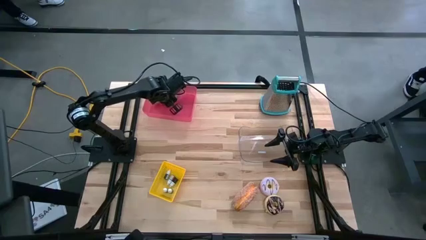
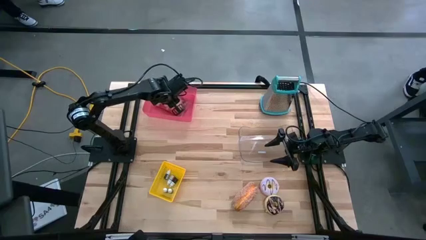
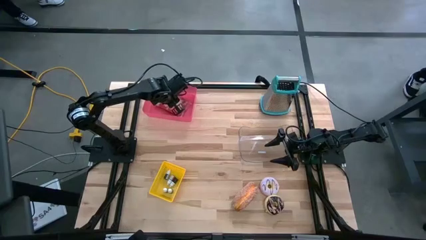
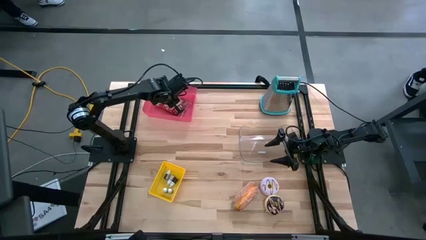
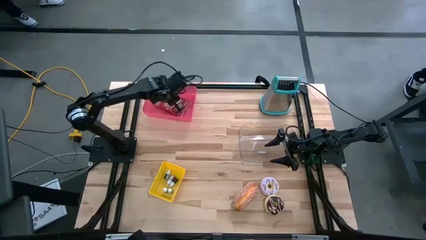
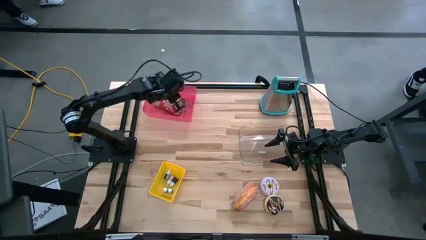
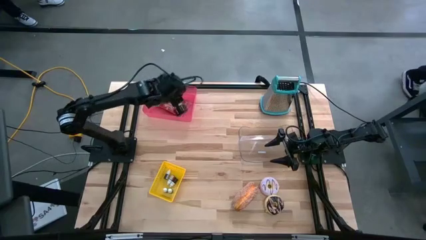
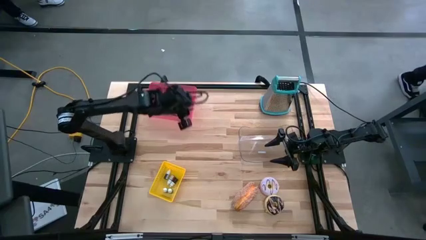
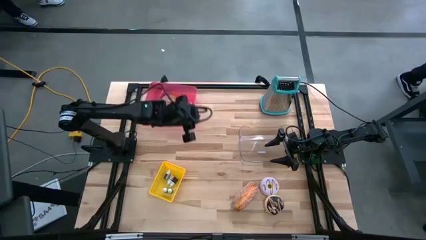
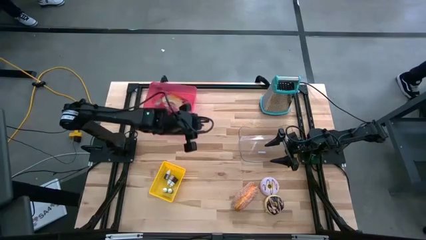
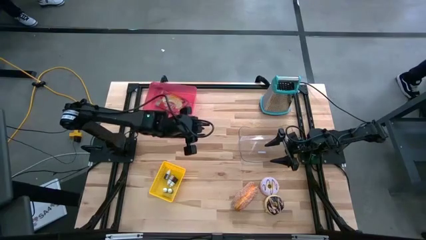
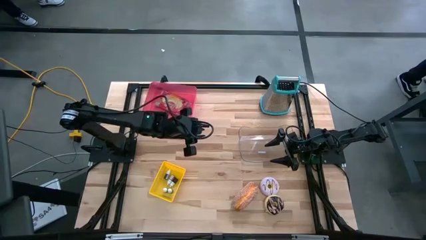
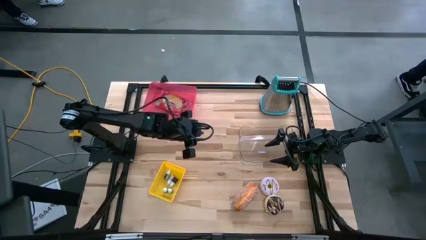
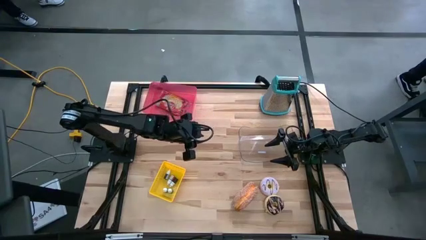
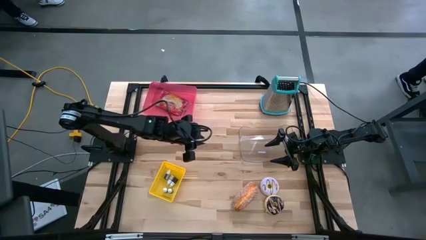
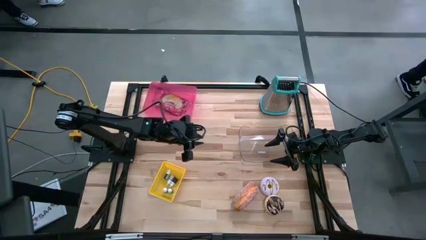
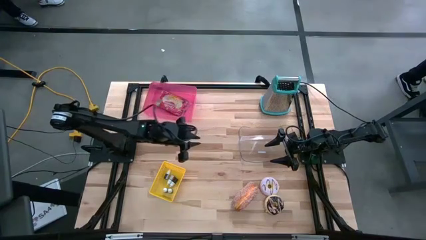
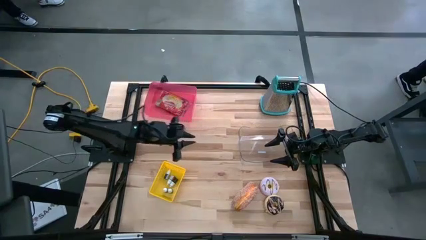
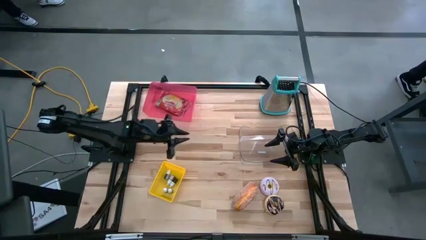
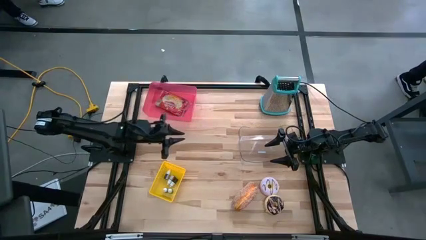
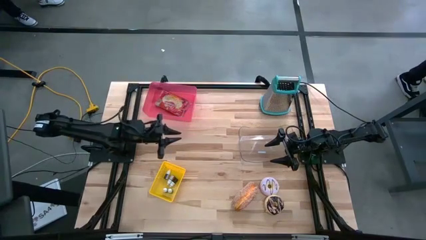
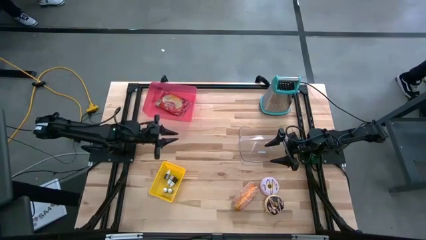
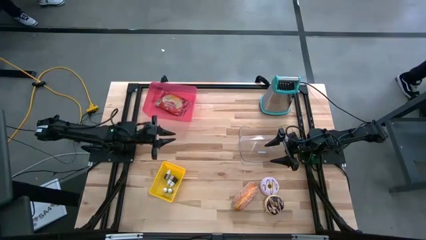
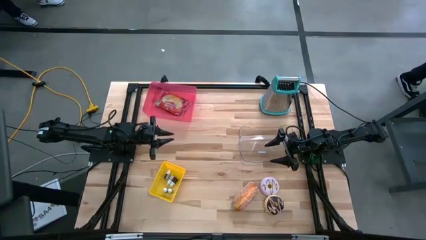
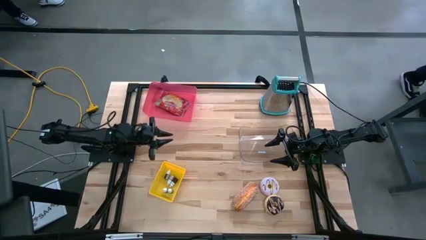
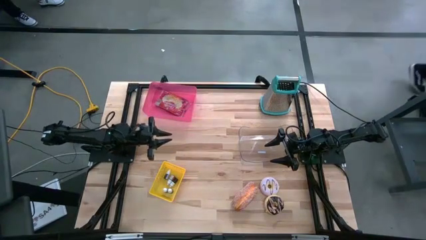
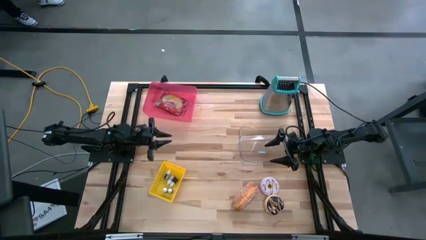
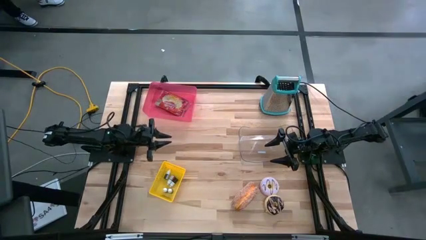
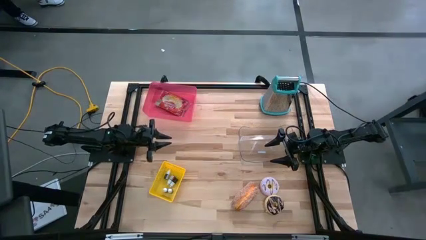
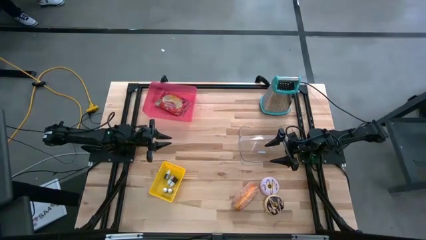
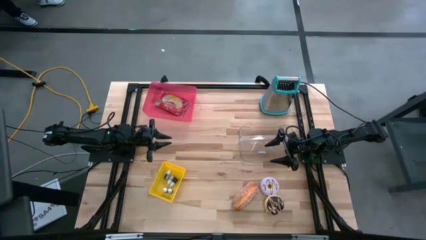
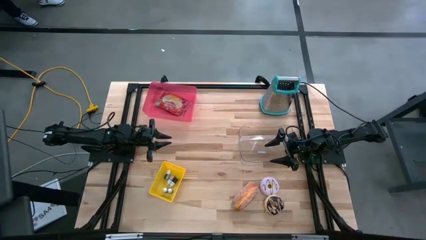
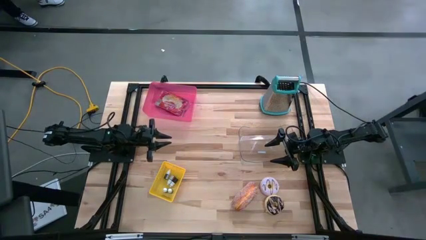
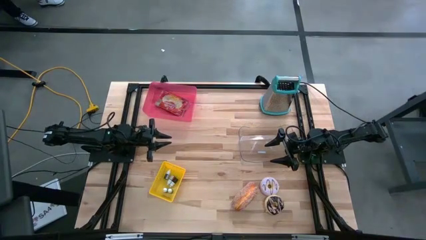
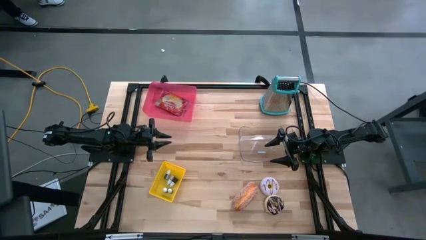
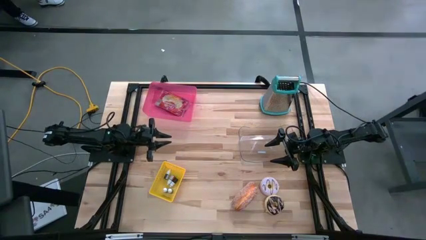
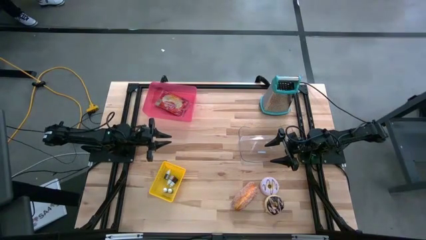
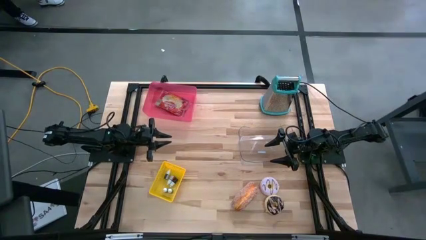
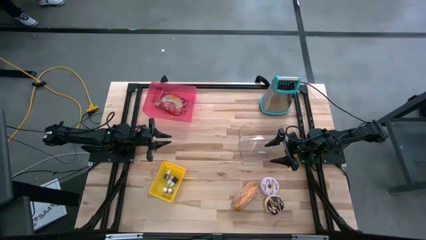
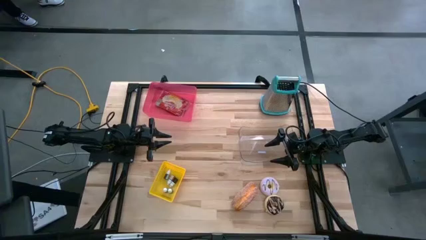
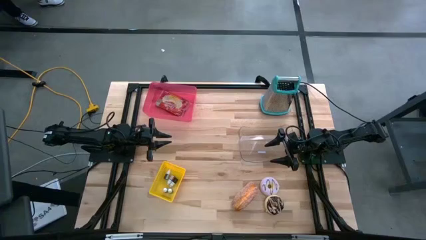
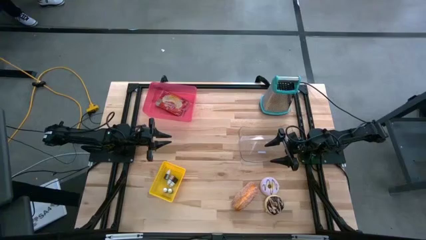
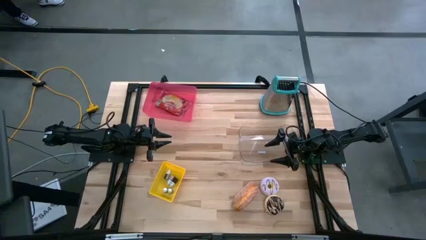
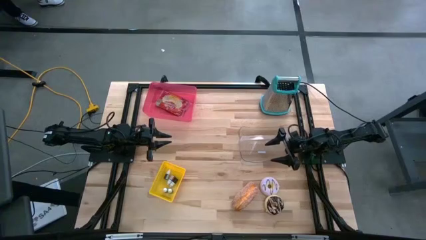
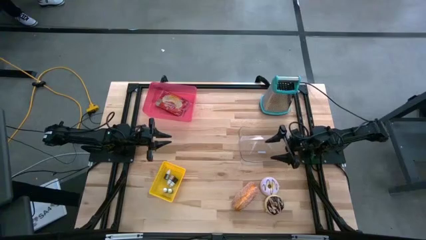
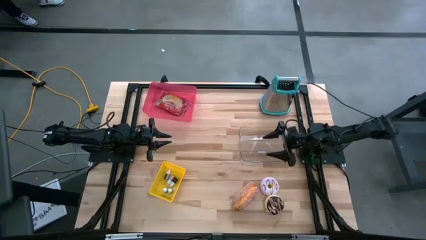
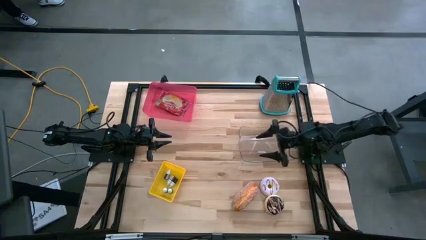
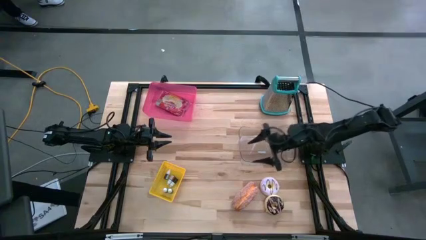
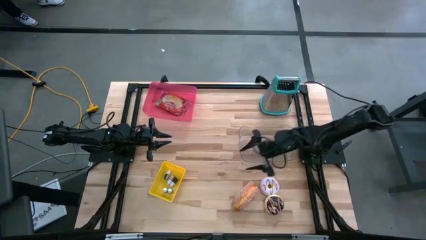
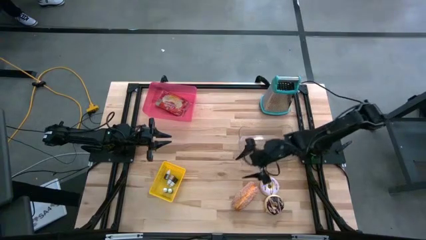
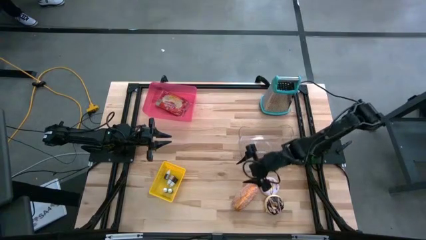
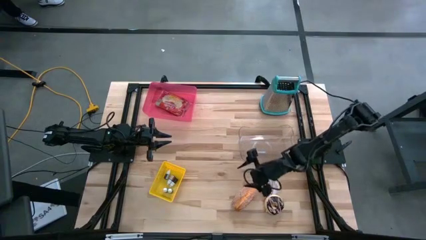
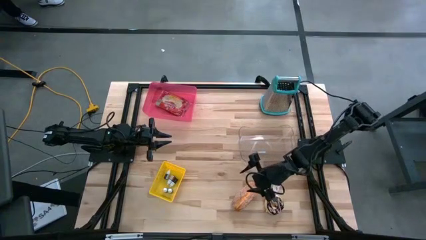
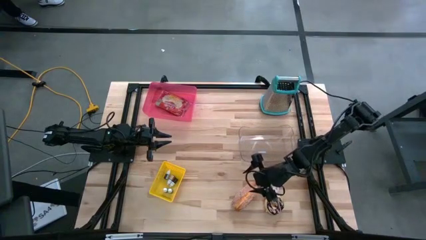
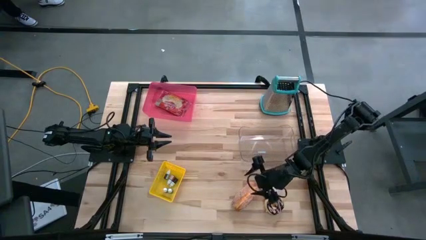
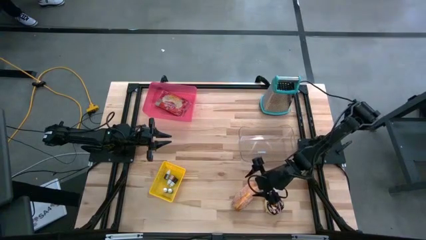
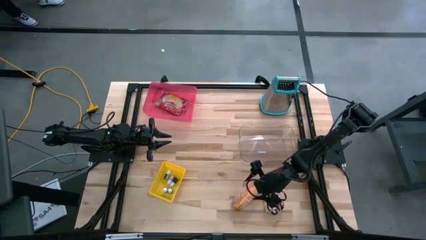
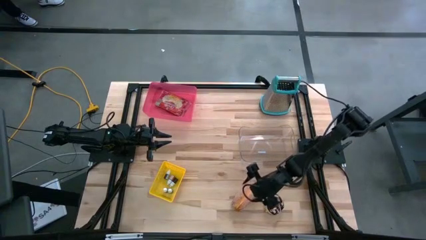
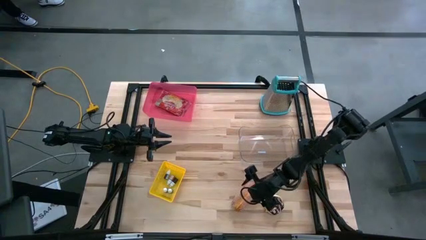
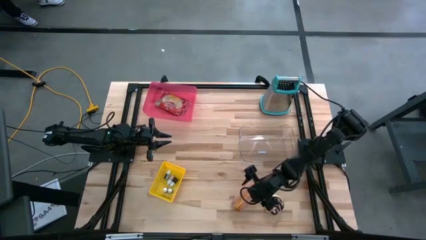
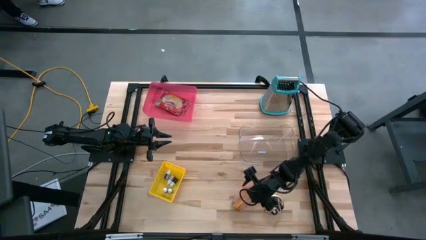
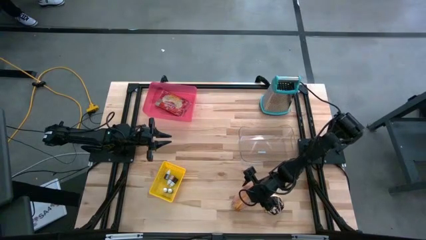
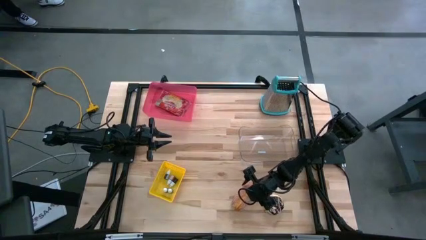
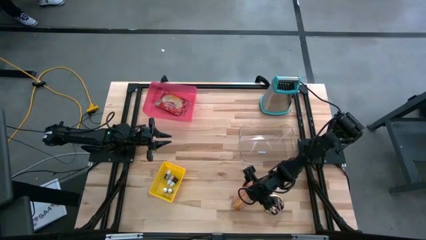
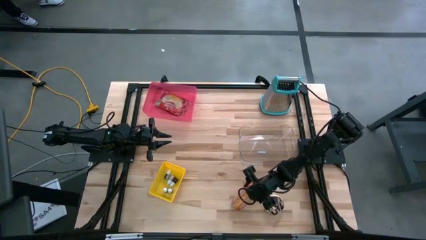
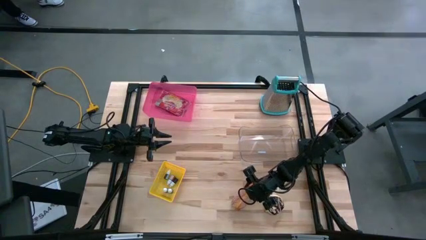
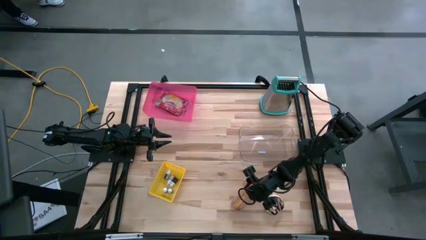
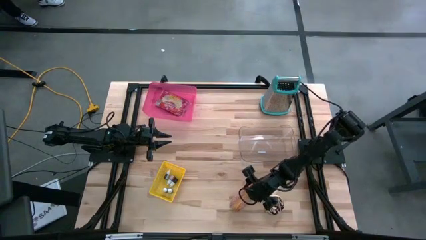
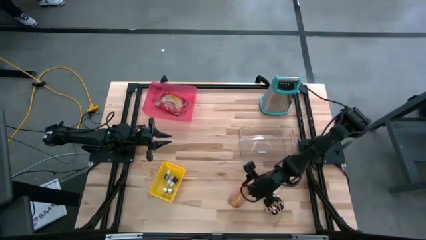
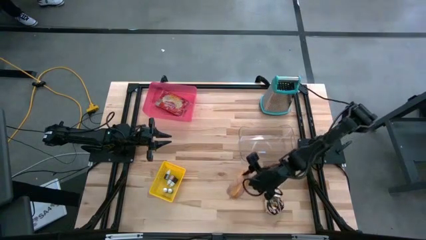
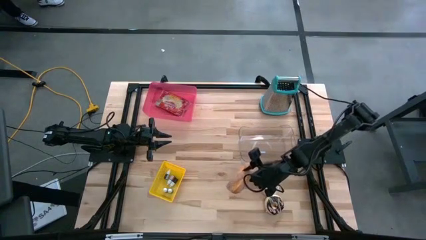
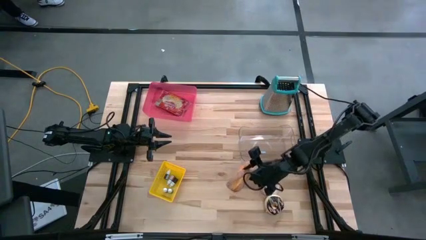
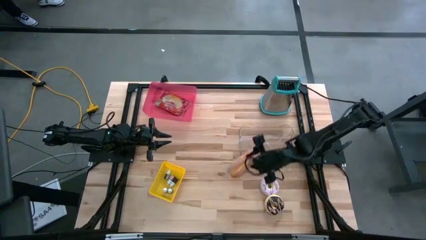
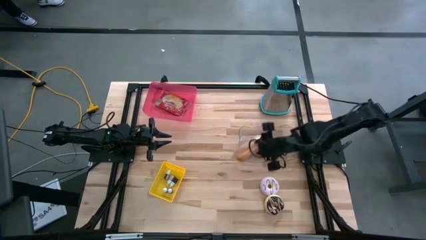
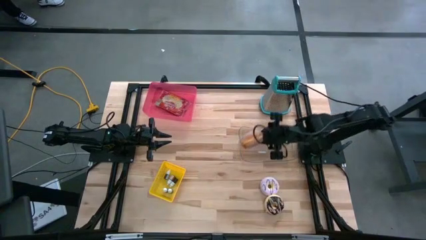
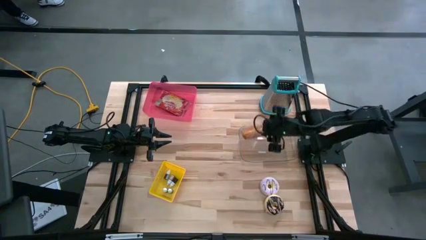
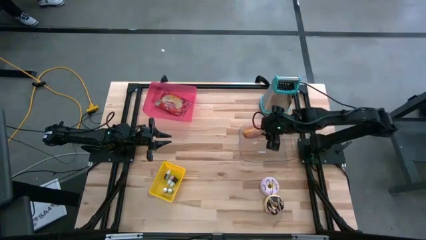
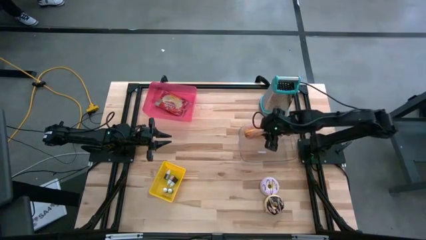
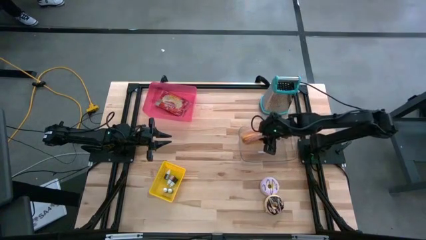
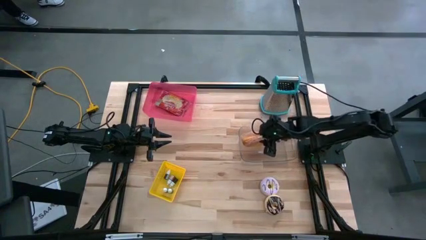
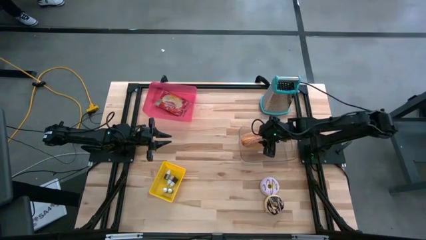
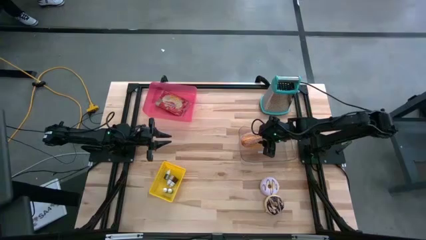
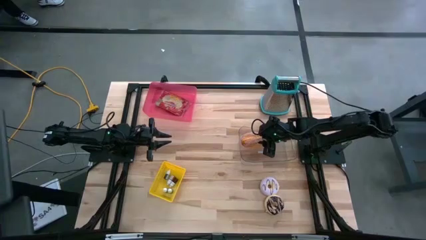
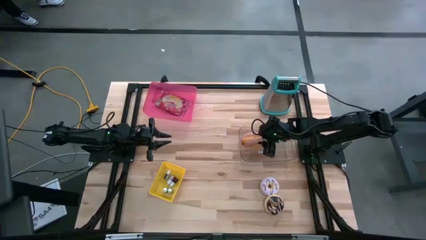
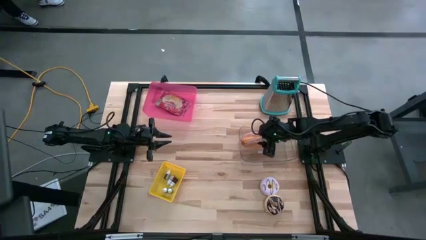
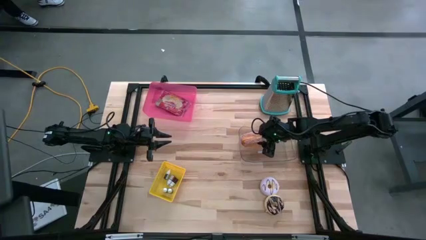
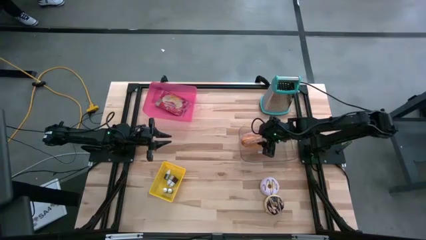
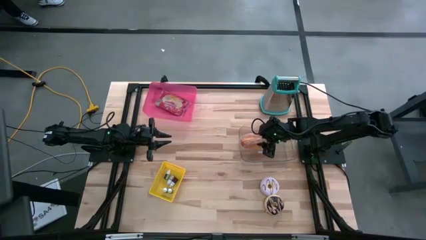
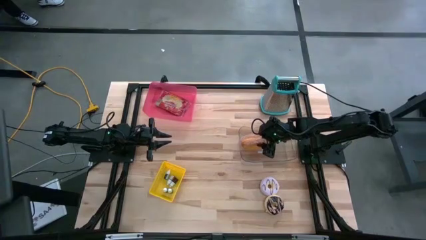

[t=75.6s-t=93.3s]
Put the brown donut into the transparent bin
